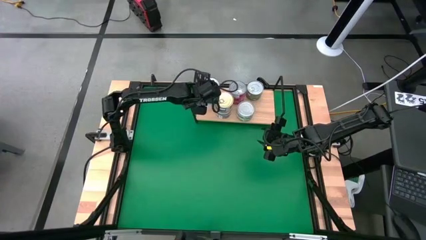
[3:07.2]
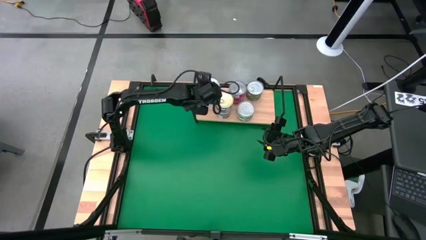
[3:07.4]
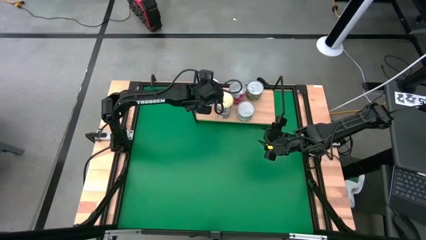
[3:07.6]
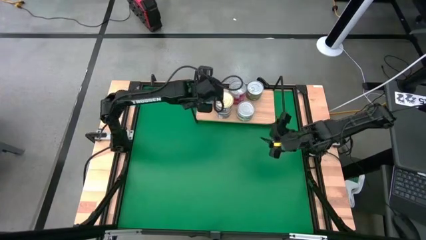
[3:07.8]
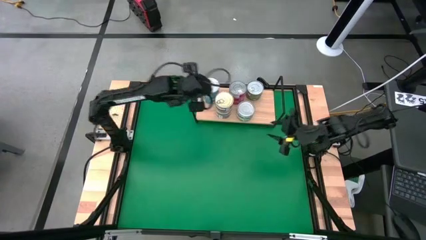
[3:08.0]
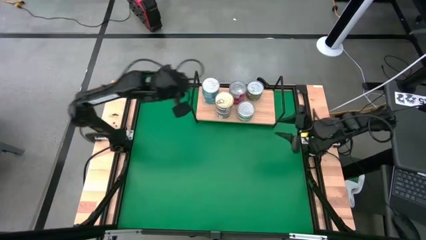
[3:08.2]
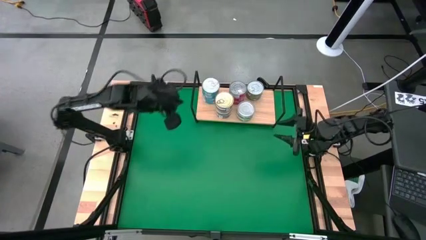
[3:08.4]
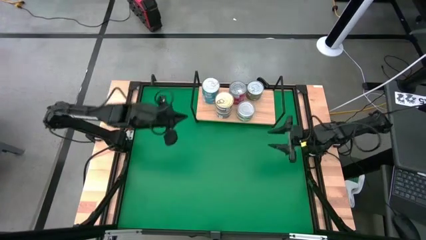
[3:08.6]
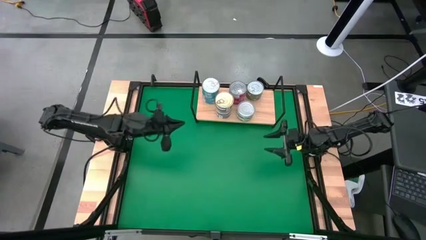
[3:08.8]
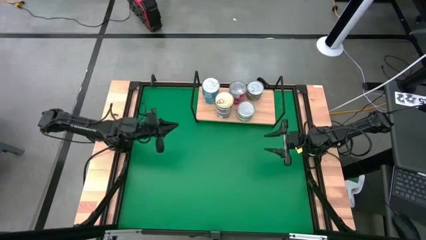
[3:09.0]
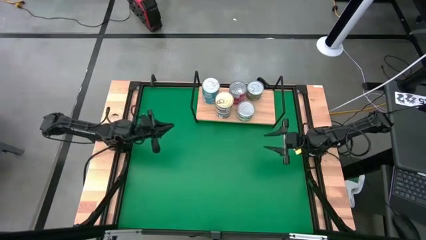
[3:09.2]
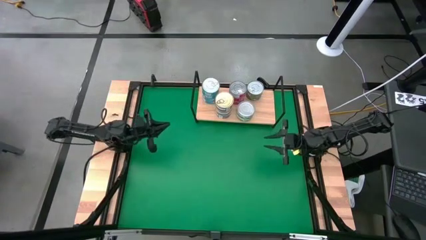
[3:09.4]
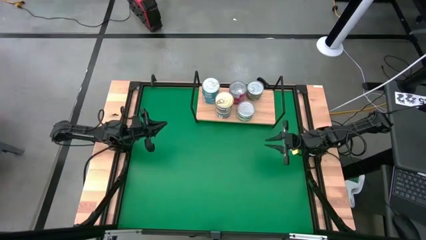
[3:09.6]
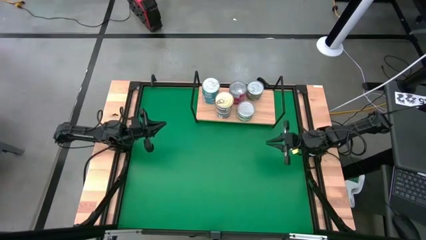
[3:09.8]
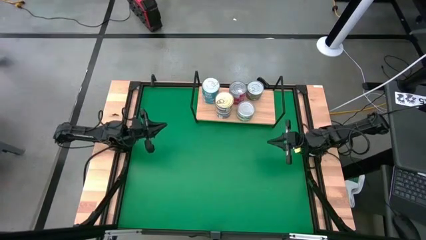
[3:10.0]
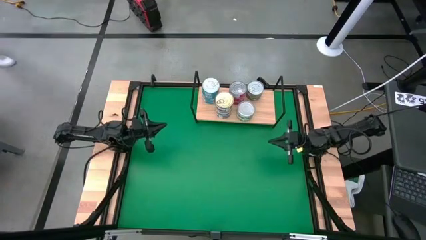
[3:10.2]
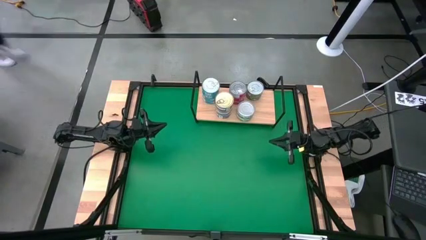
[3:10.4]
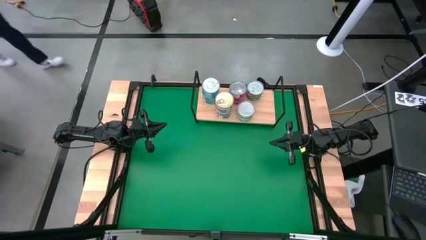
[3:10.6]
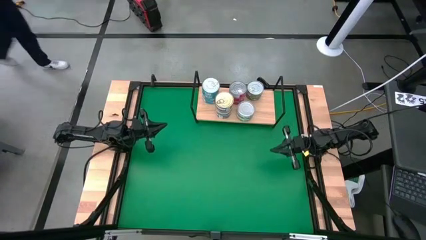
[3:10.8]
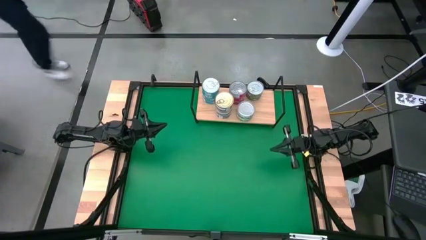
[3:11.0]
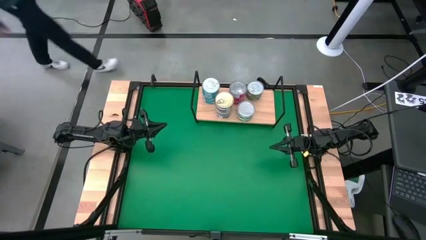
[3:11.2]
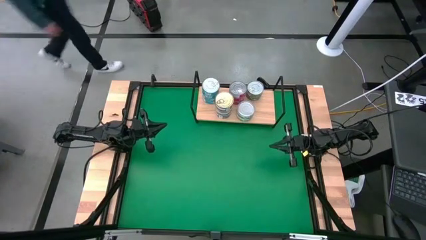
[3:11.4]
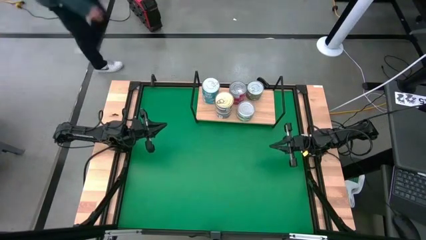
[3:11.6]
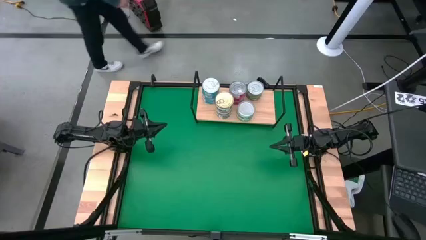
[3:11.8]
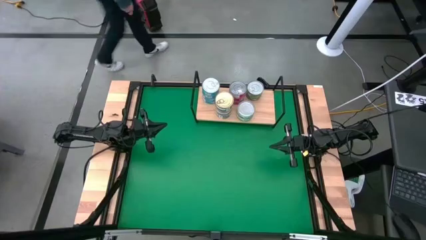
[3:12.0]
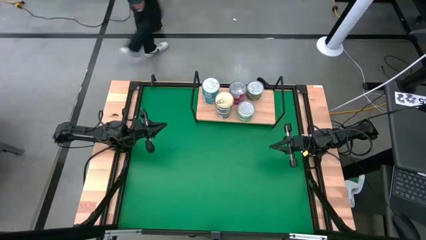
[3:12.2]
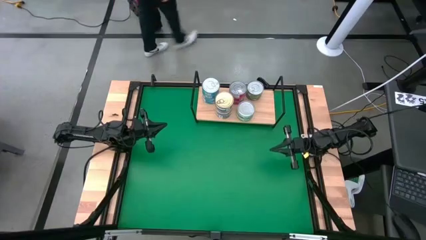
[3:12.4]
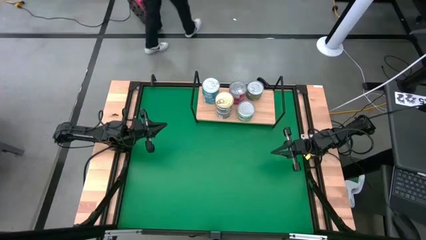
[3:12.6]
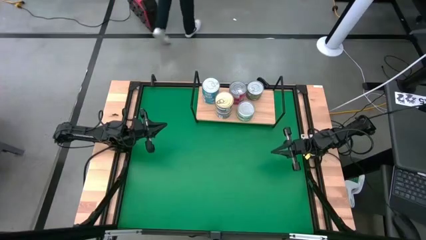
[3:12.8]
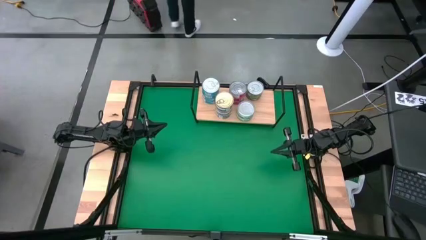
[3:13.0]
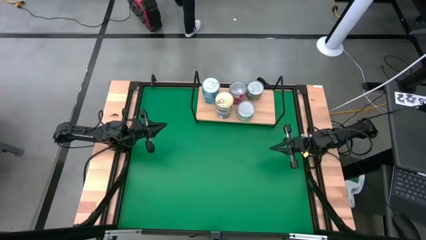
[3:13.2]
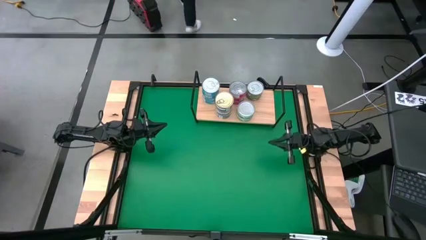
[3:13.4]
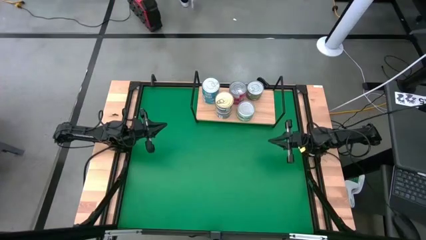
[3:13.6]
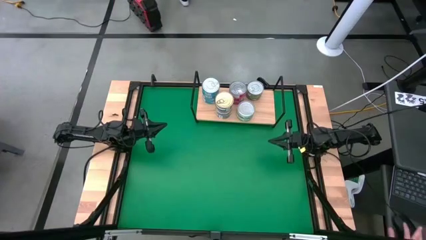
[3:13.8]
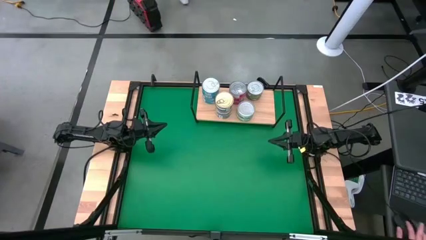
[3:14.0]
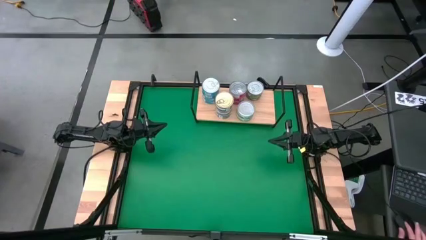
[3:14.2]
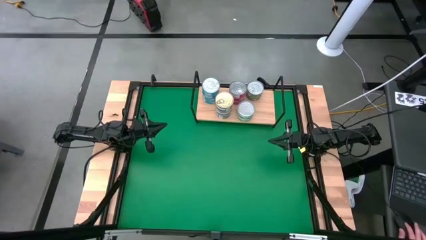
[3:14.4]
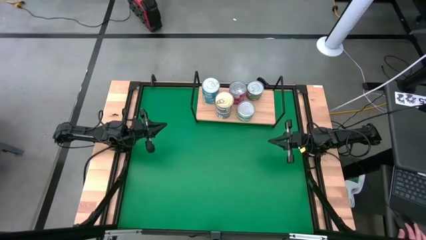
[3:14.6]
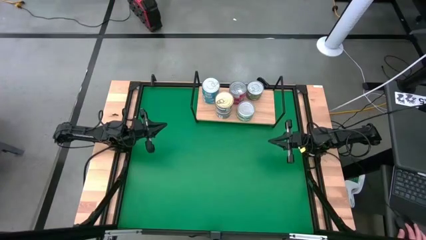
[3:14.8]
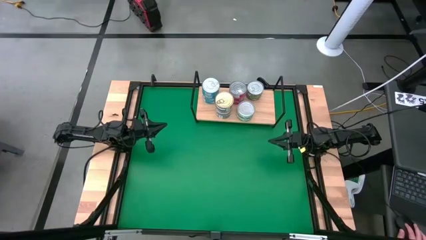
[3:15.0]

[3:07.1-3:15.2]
Task: Stack canned seafood by type on shelf
Return to Home Position

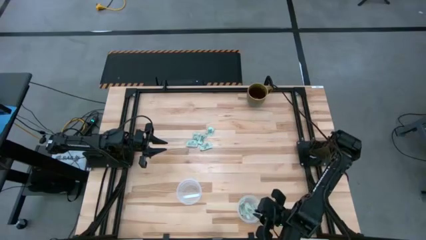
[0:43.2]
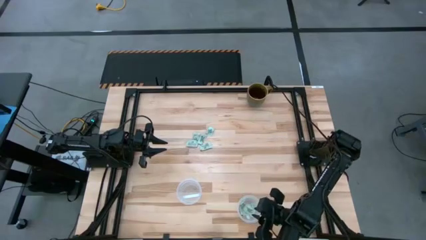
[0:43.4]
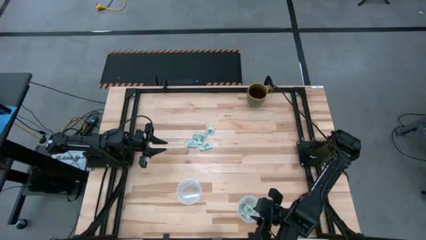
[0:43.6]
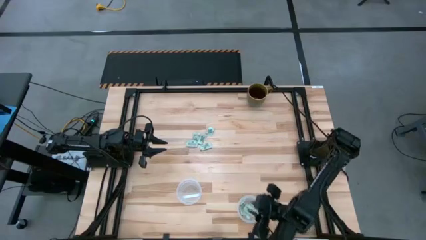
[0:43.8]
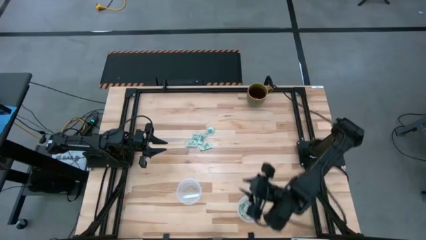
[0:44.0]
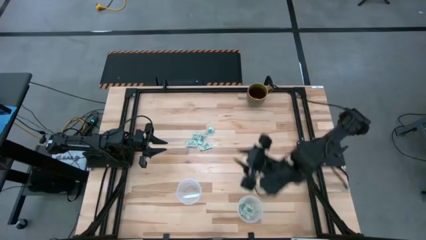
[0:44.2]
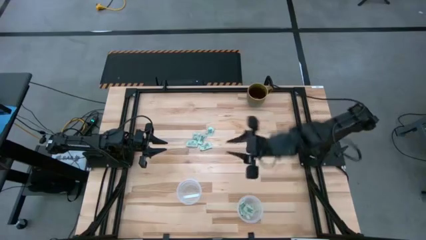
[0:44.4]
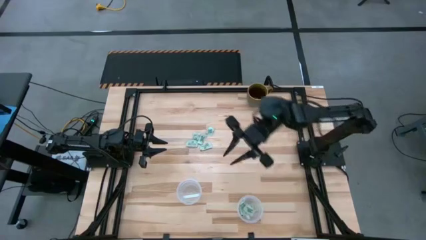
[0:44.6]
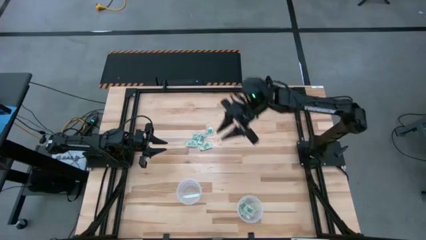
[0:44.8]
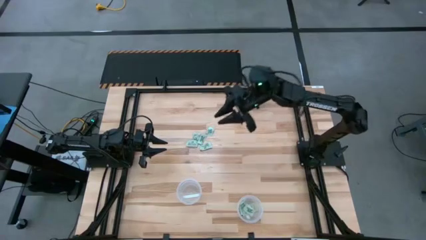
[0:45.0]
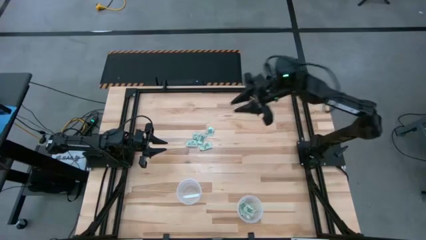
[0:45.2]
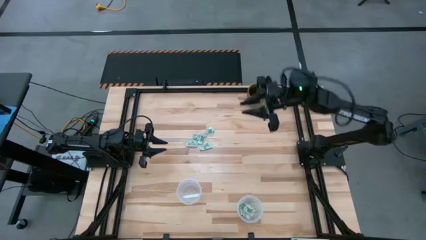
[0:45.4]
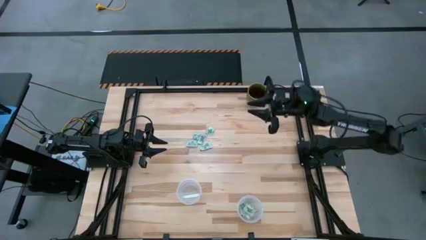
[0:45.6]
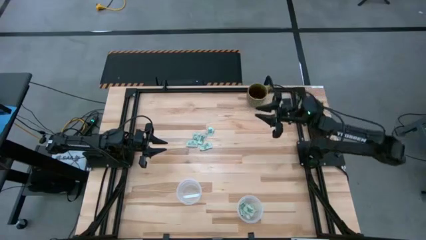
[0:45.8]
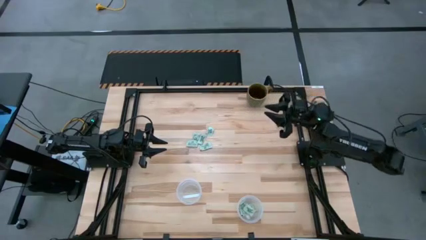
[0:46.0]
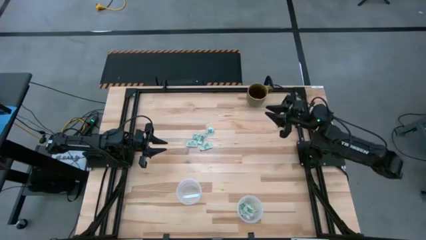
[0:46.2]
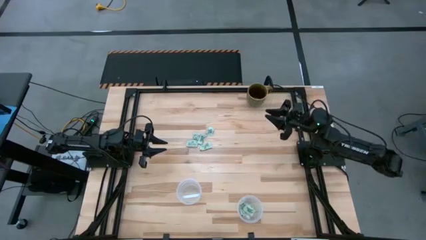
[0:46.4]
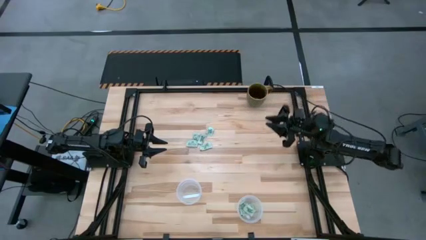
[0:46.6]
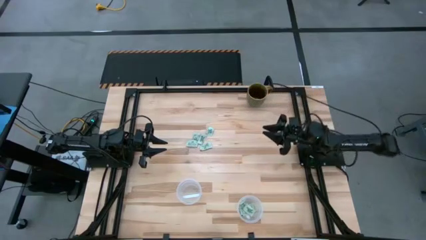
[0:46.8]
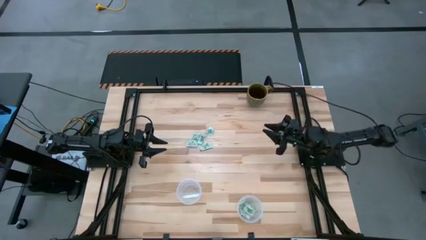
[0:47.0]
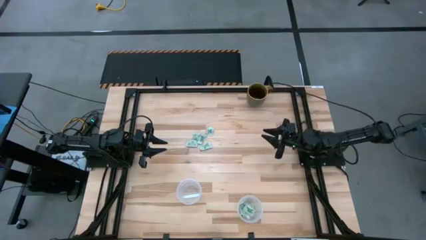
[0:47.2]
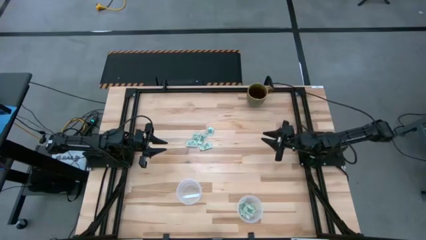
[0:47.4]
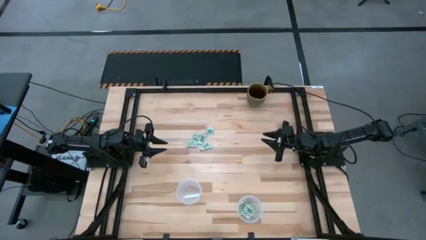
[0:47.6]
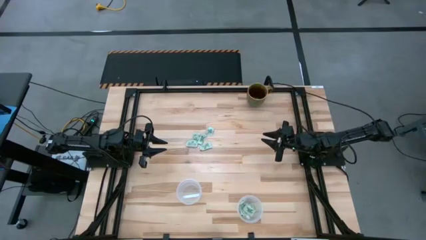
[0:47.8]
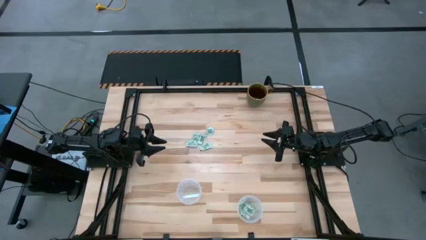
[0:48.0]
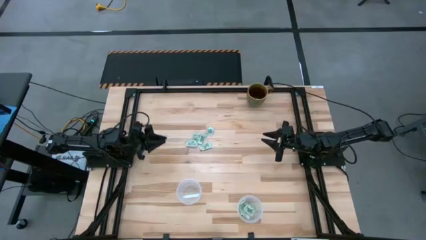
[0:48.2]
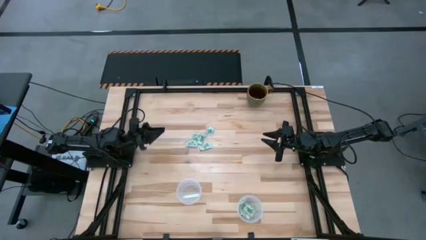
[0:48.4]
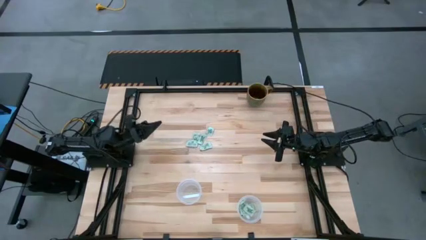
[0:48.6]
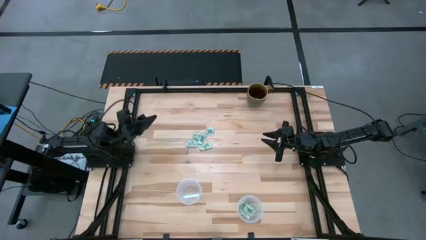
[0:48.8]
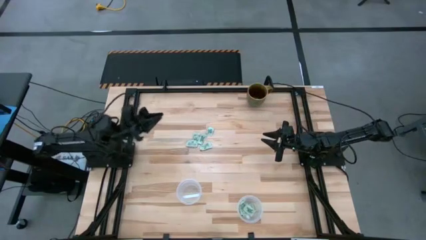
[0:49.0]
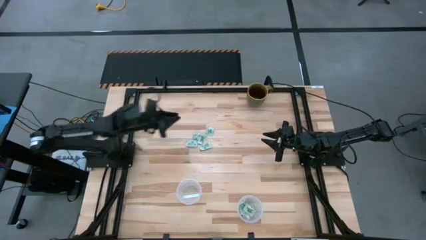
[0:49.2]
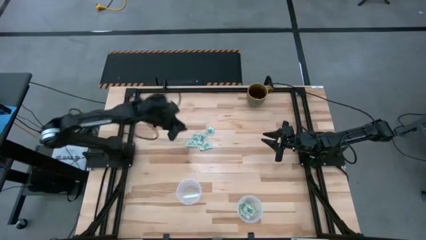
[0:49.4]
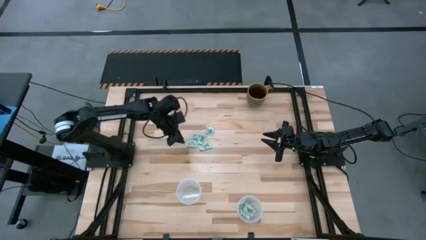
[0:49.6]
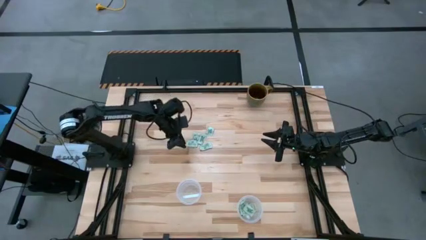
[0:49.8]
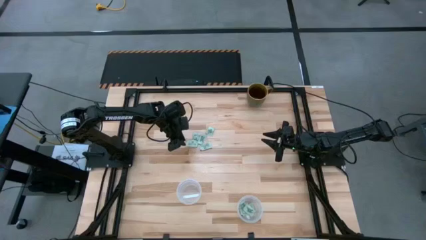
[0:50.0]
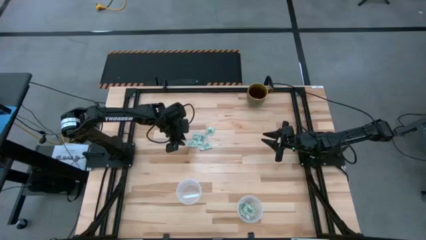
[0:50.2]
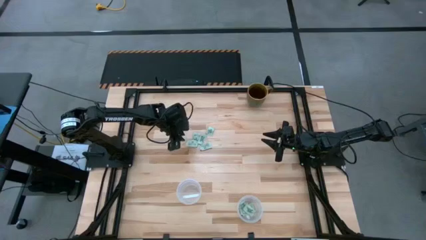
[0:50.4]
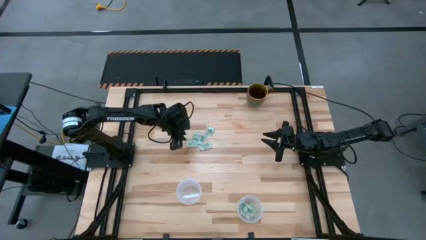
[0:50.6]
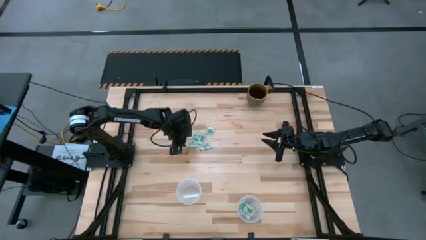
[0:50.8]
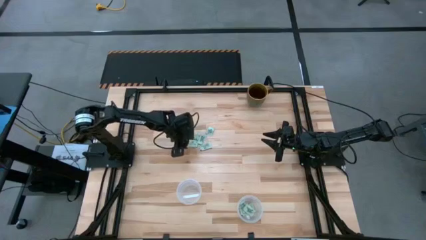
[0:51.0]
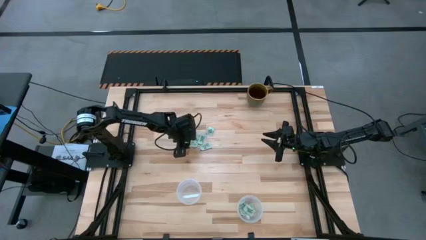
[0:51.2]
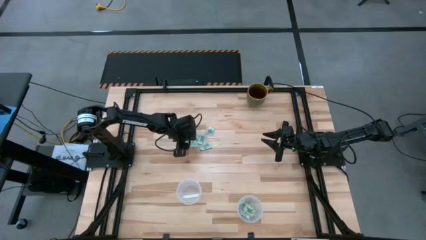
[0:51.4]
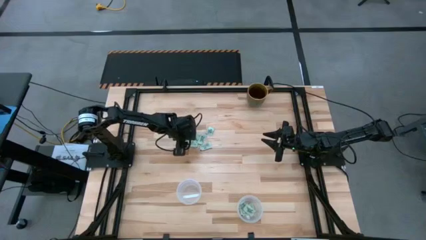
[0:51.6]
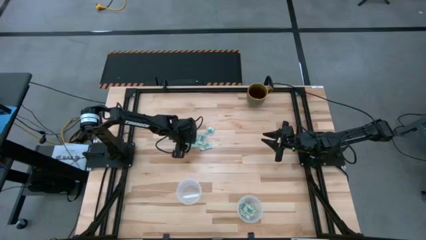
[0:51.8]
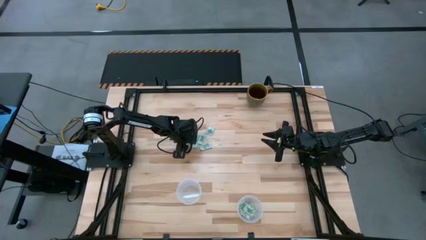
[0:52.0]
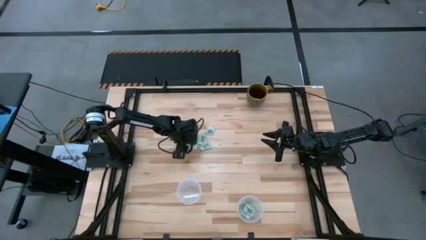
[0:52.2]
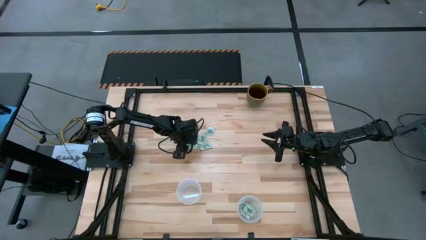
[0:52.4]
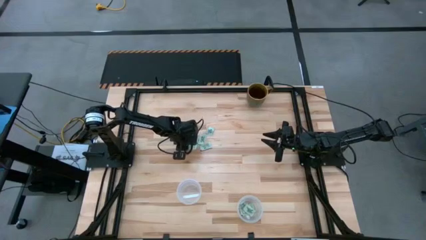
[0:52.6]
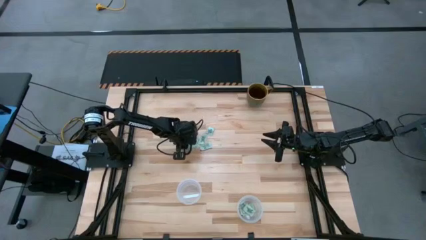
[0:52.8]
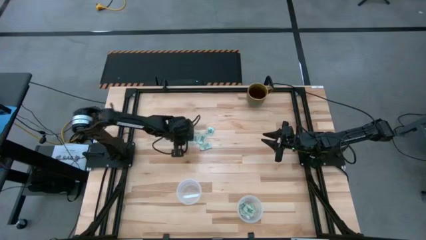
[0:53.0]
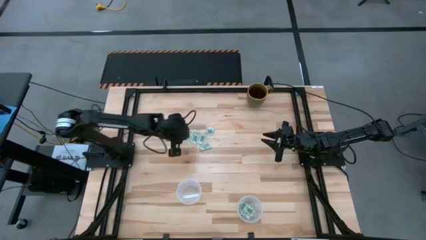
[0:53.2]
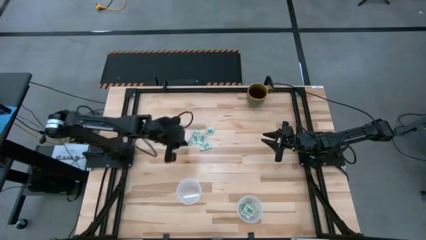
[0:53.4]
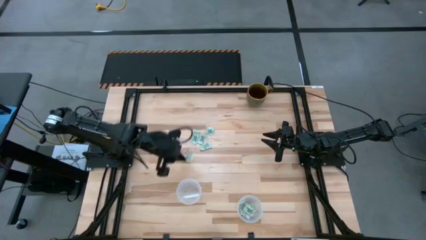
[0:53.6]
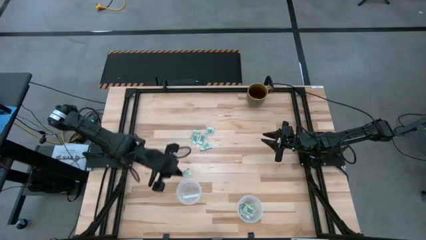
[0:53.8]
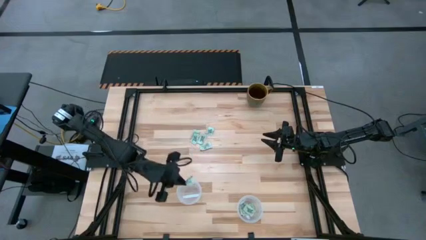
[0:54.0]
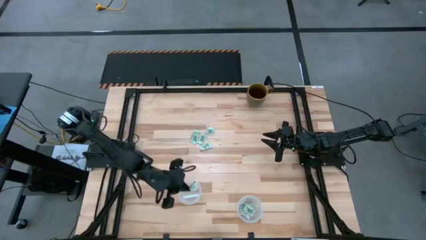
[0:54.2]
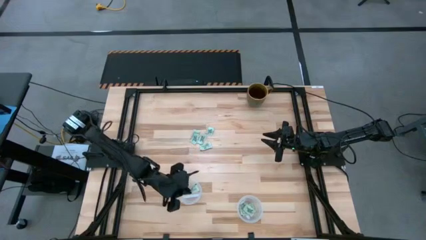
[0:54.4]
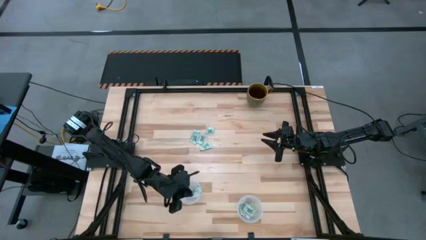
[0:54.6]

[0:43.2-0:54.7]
Task: Pick and place items into bin
Put the stevia packet into the left transparent bin
